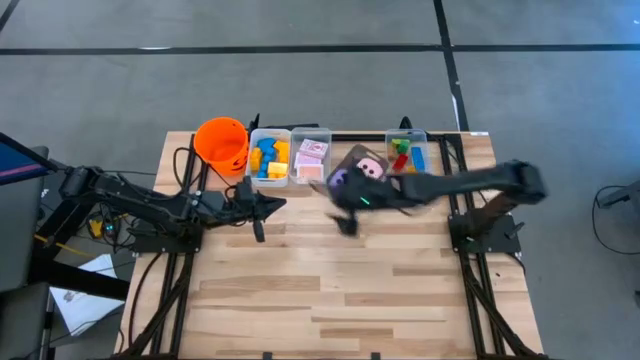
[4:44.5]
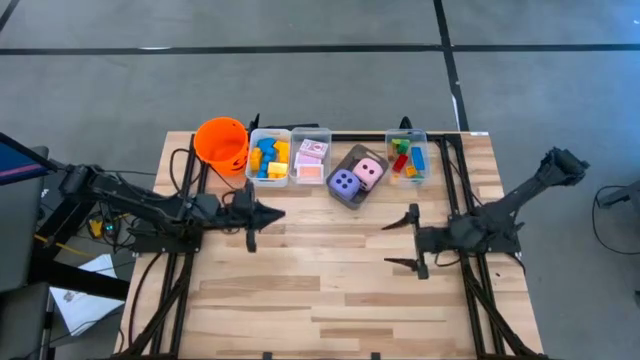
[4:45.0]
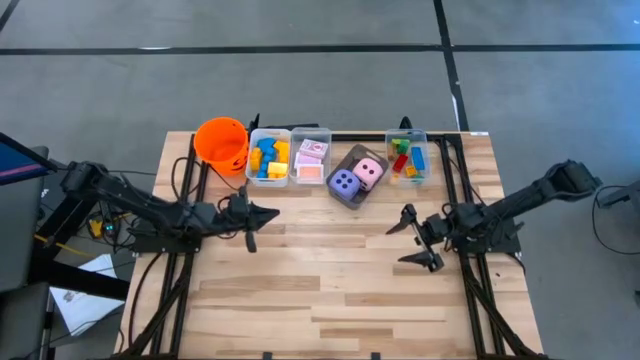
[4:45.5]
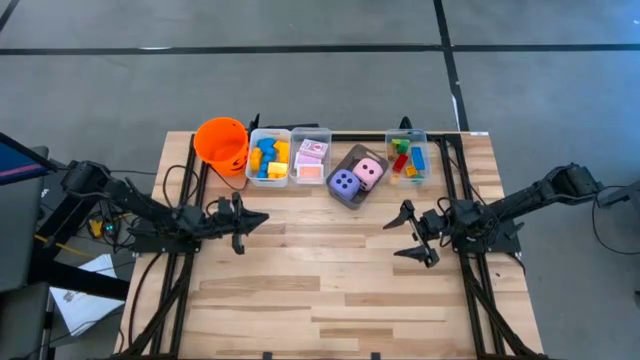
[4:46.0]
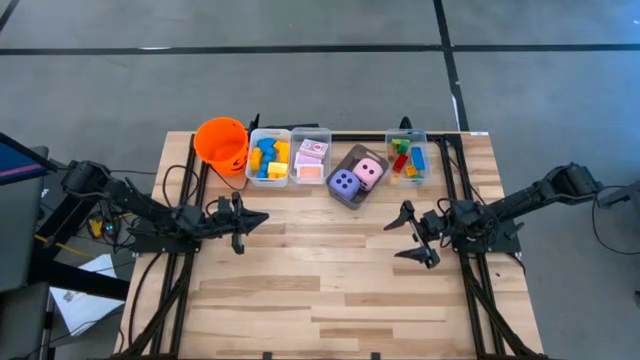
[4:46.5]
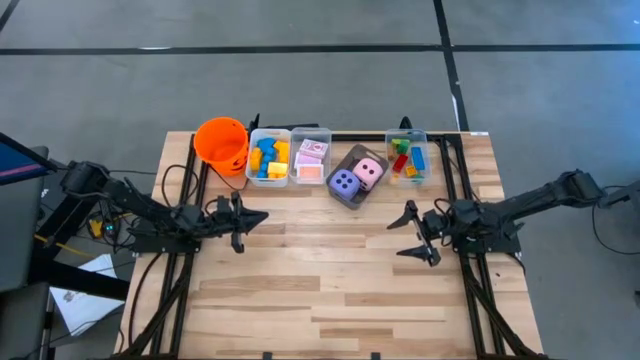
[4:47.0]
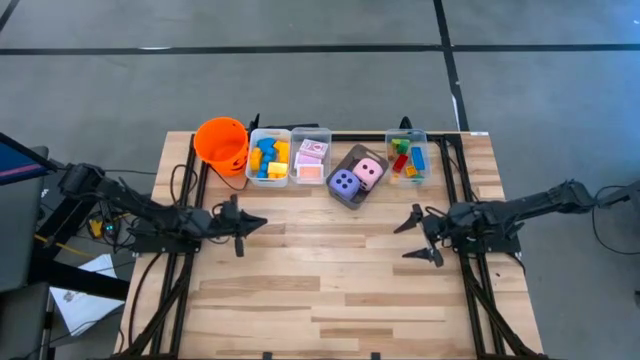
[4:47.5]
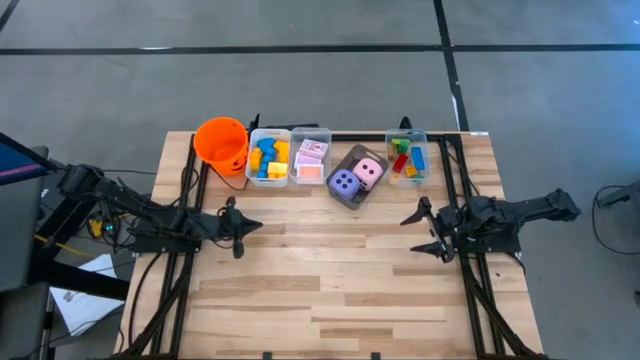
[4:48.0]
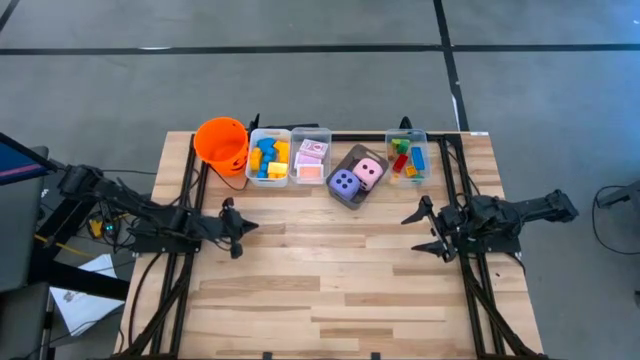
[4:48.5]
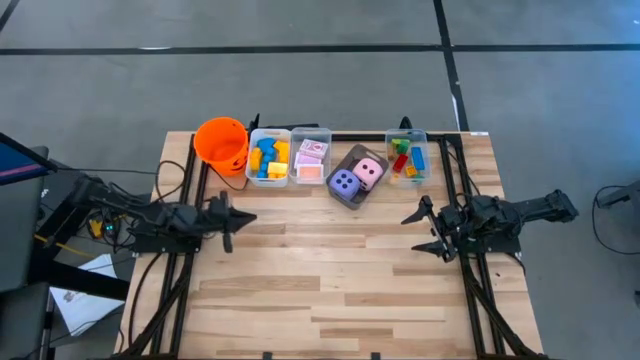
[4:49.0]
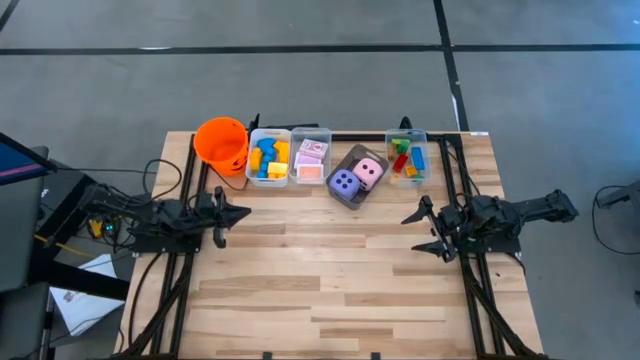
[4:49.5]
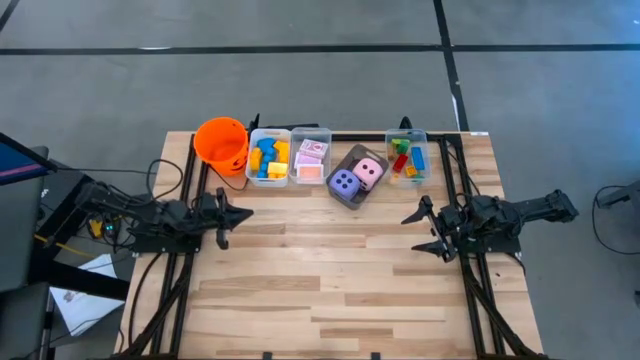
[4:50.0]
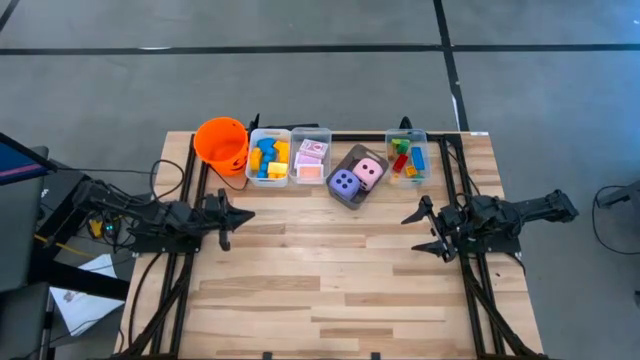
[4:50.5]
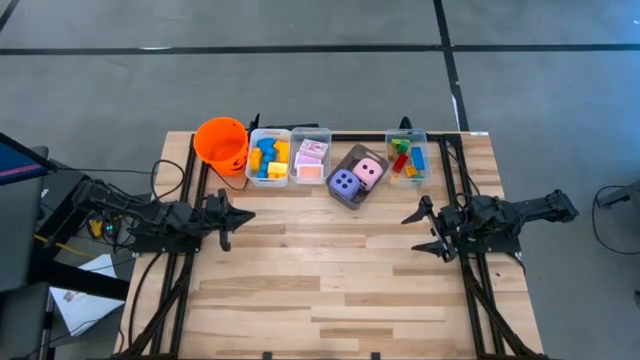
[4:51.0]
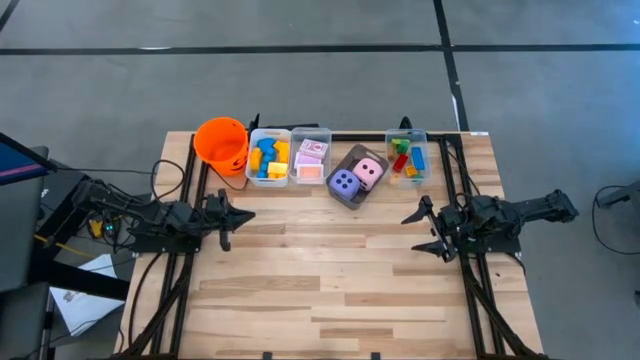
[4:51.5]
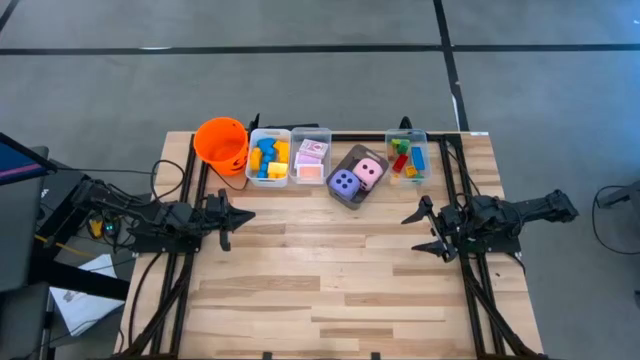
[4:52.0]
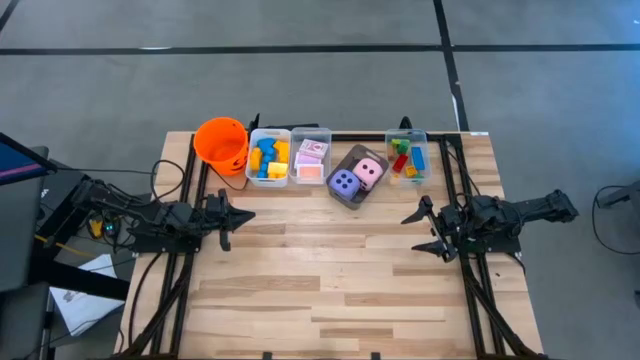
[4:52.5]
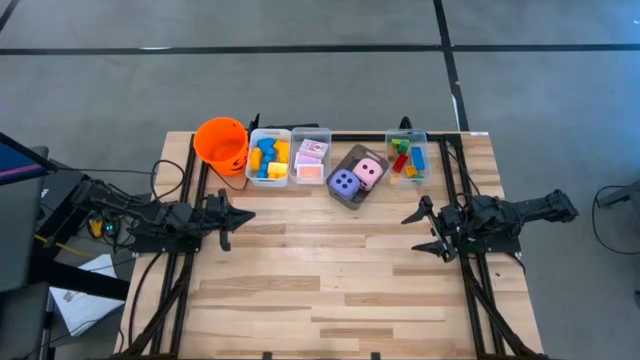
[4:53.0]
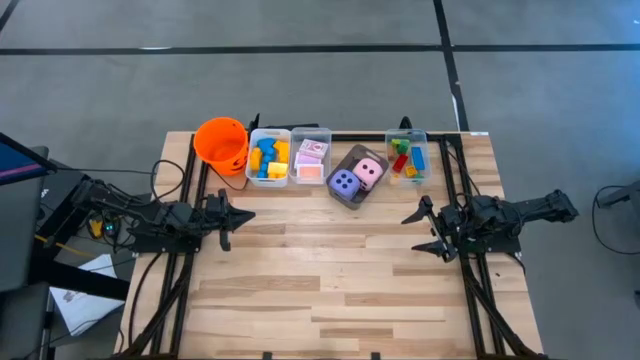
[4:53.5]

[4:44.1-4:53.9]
Task: Pick & Place Toys
Return to Home Position

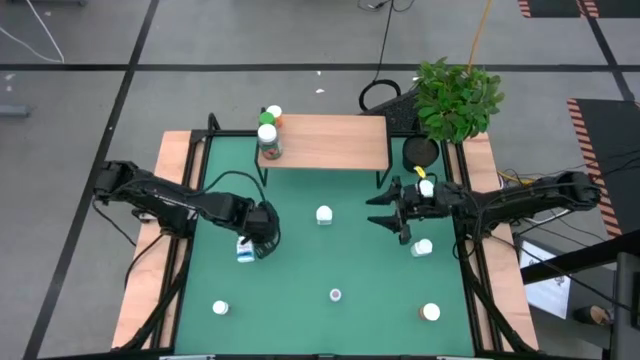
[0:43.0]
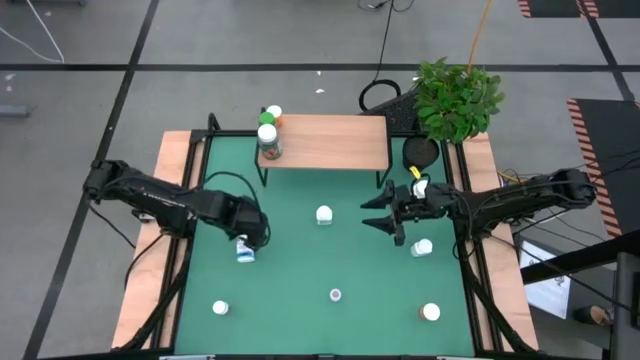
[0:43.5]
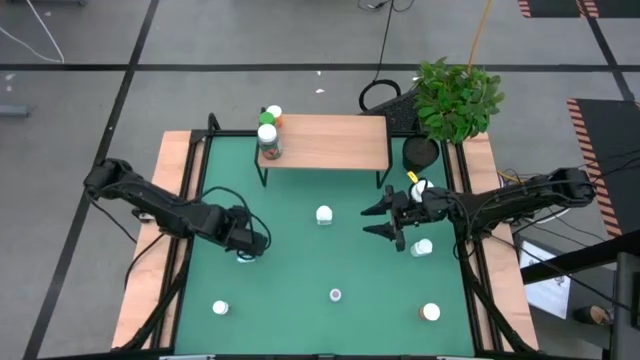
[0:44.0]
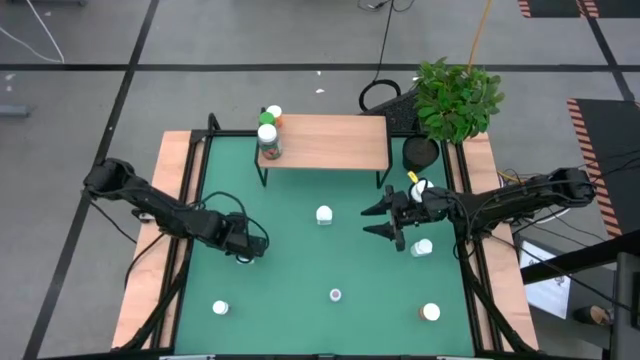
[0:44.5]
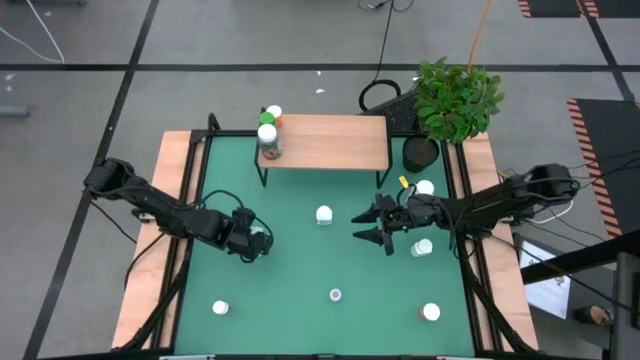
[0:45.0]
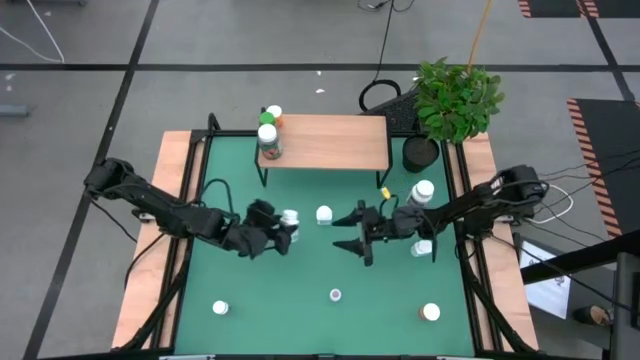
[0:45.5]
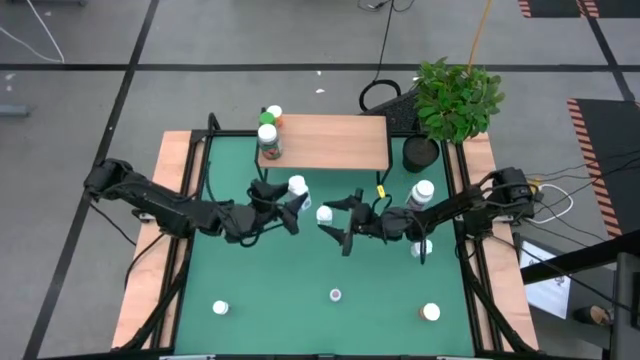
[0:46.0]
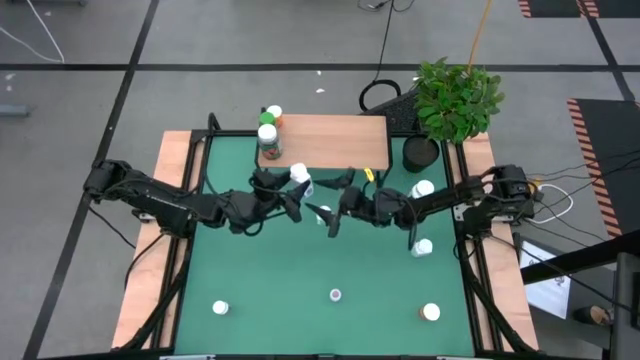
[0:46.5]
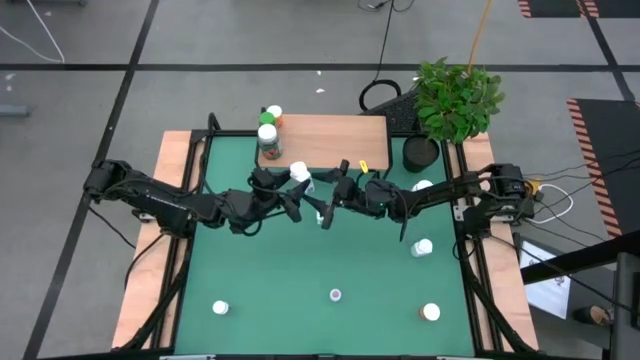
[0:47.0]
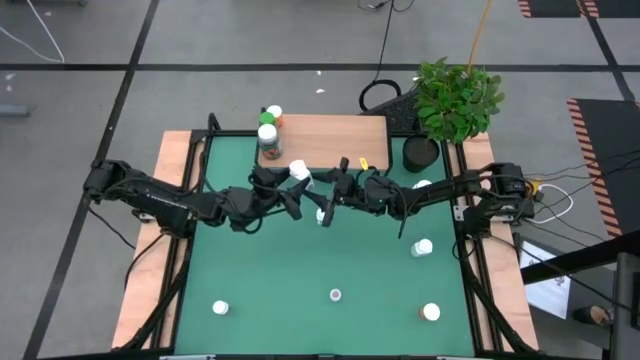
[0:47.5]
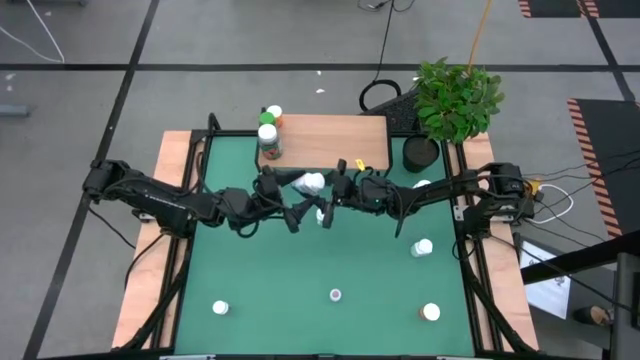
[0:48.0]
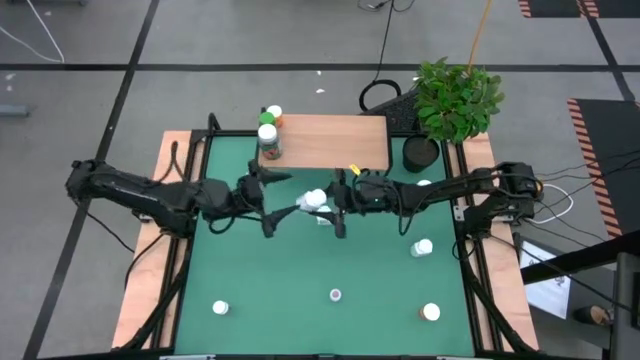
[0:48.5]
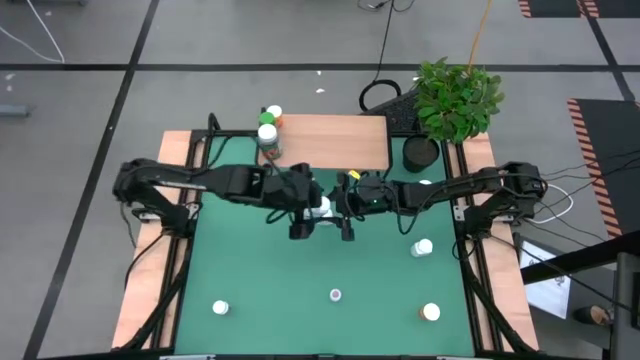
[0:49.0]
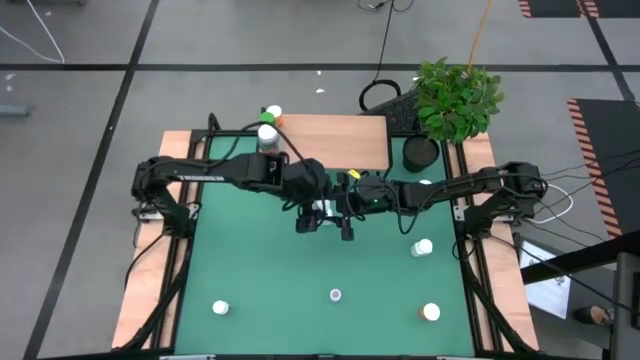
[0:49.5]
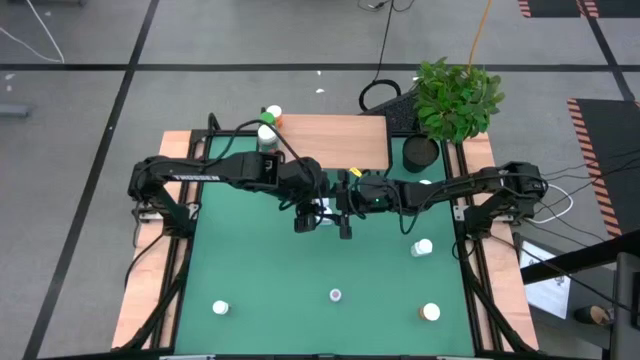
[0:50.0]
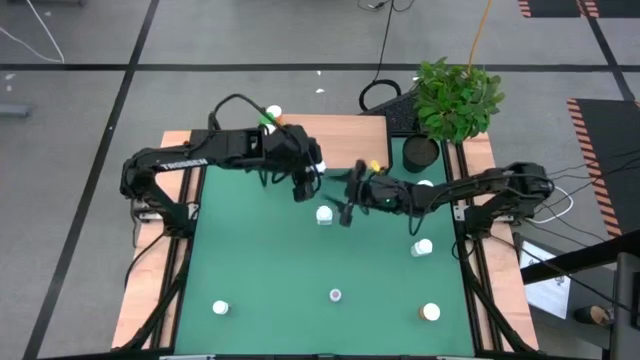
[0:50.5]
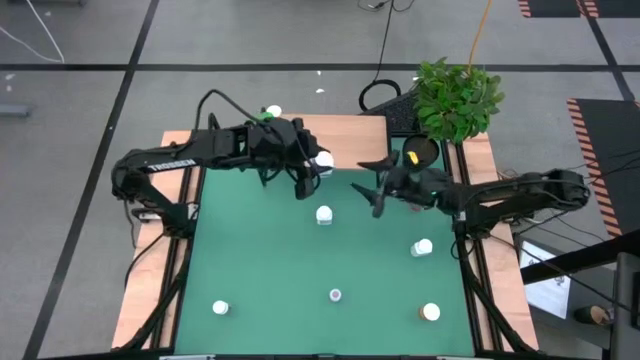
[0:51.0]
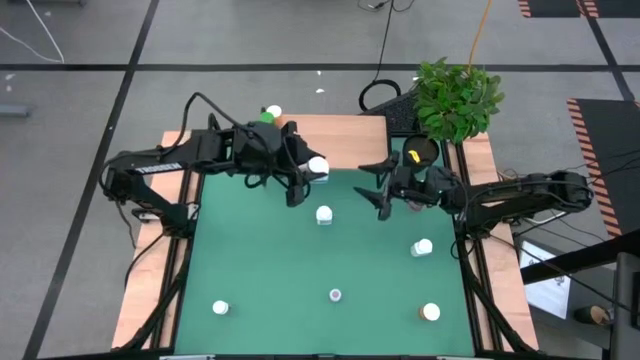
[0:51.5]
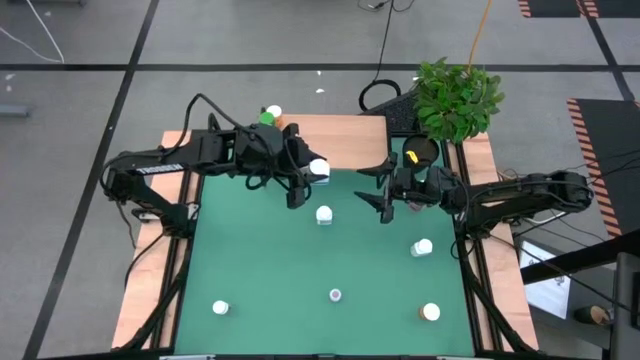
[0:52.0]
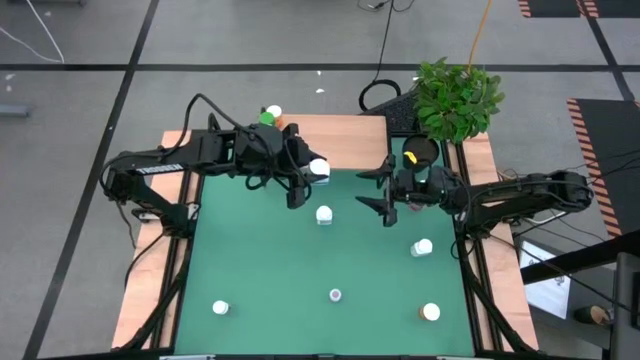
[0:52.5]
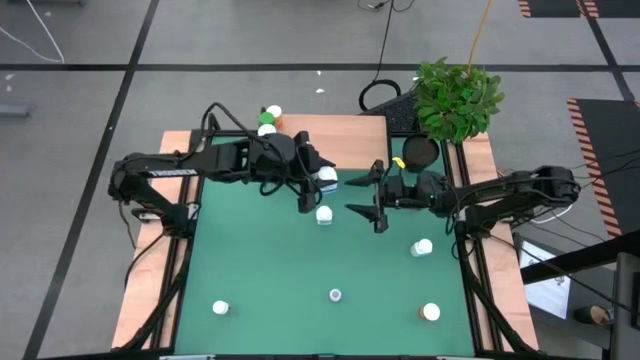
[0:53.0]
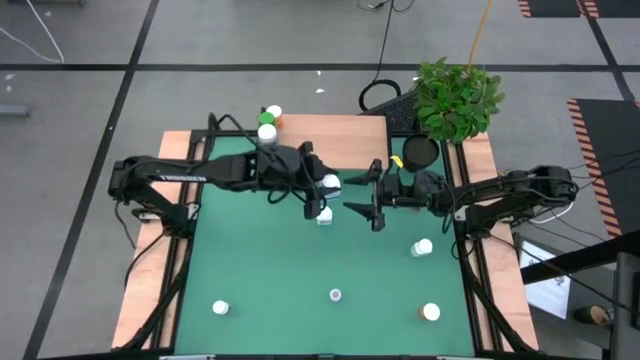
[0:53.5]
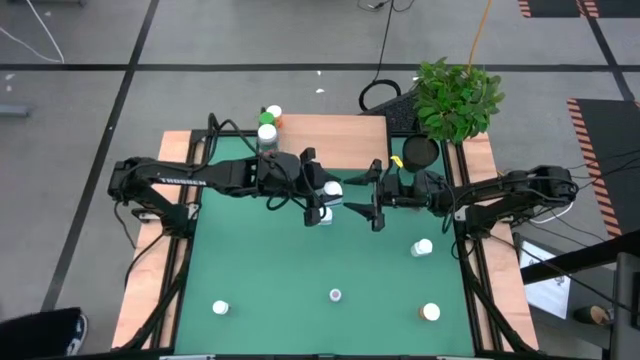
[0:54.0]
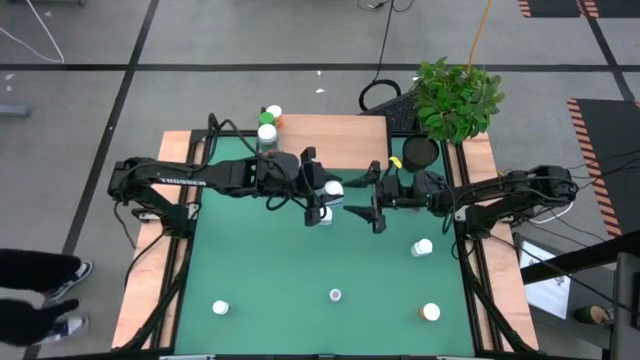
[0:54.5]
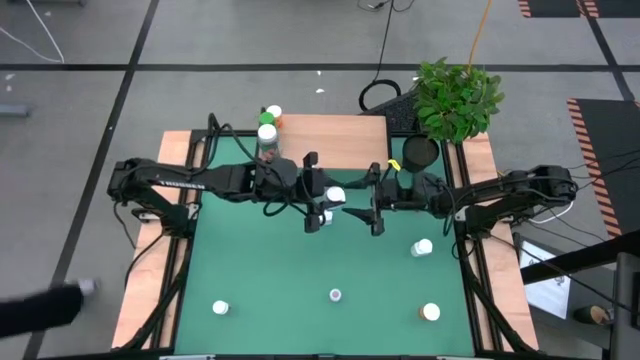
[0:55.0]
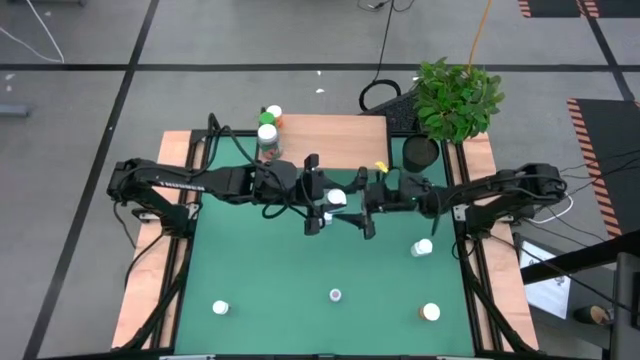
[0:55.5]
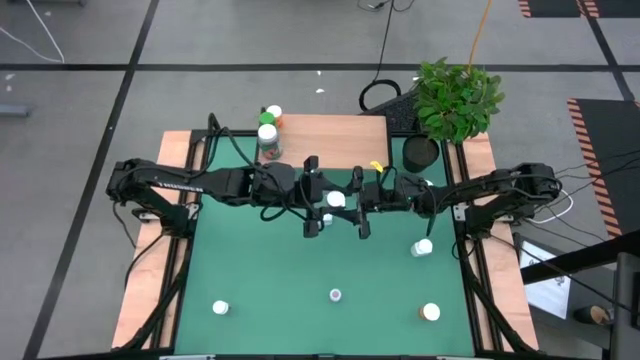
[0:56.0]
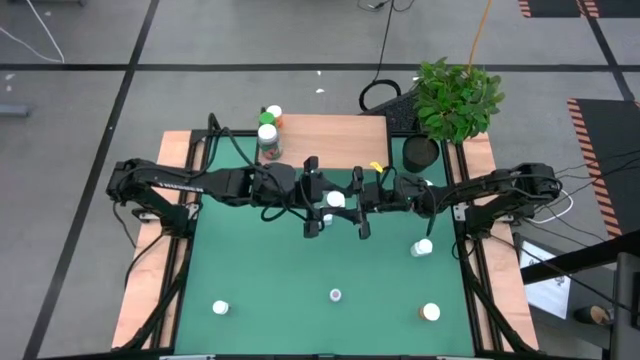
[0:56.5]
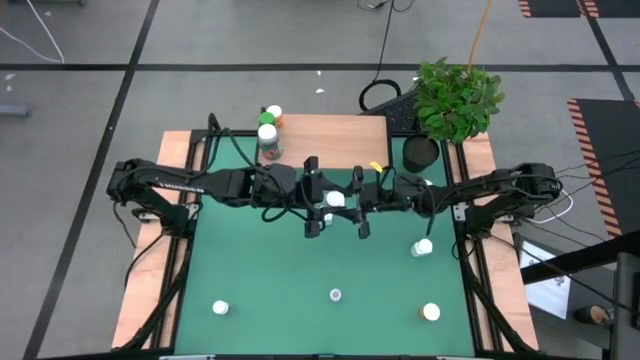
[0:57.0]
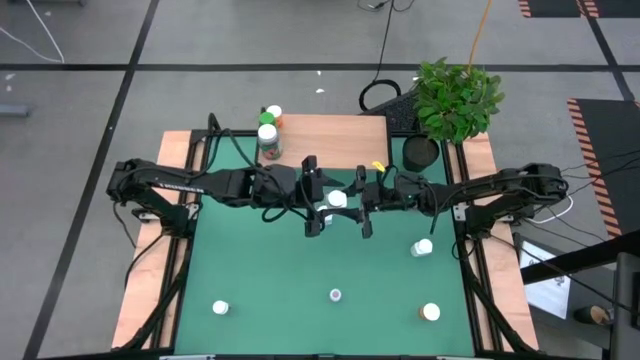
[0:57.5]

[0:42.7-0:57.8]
Task: Pick and place medicine bottles onto shelf by color
Put the bottom left blue bottle on the shelf
